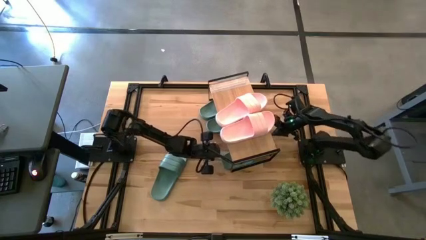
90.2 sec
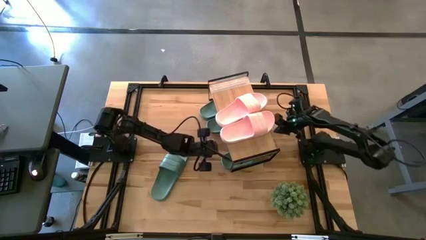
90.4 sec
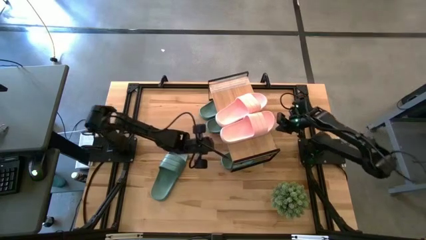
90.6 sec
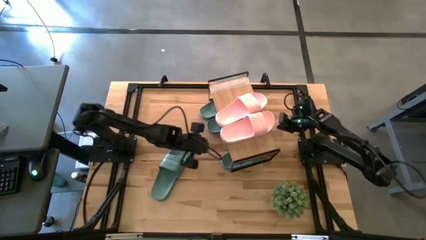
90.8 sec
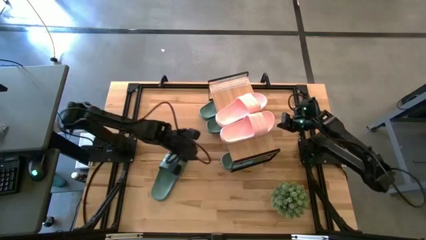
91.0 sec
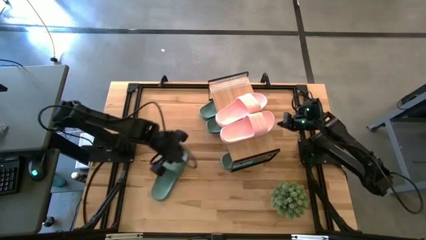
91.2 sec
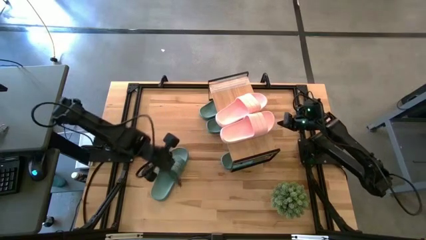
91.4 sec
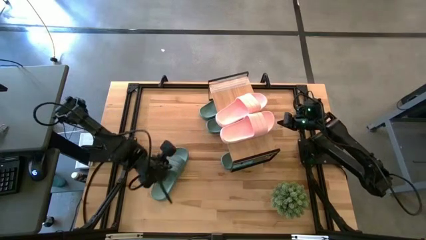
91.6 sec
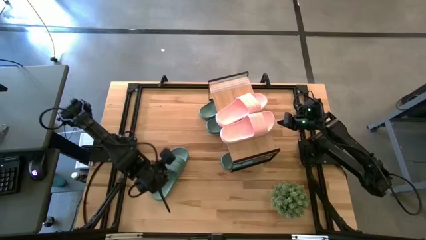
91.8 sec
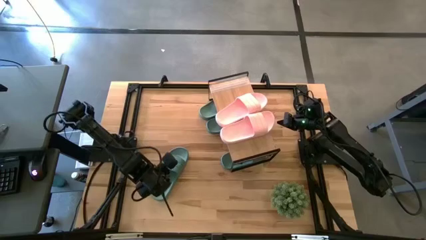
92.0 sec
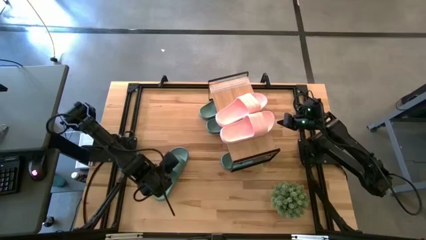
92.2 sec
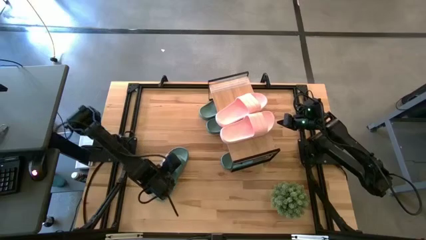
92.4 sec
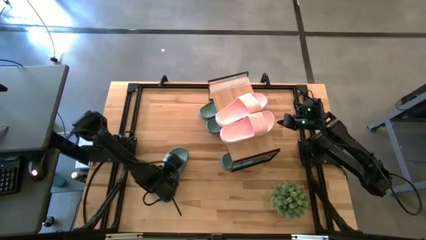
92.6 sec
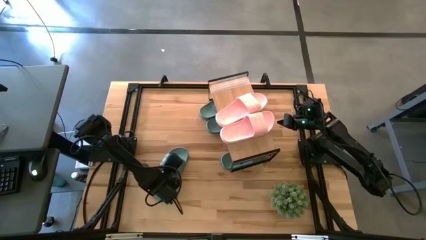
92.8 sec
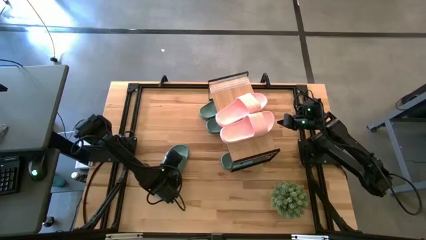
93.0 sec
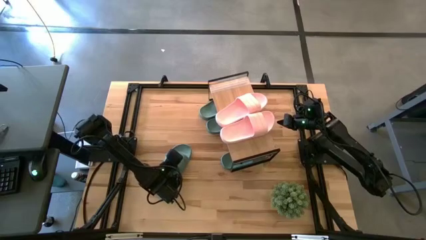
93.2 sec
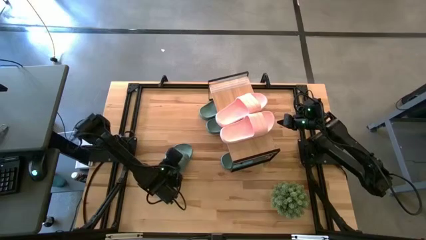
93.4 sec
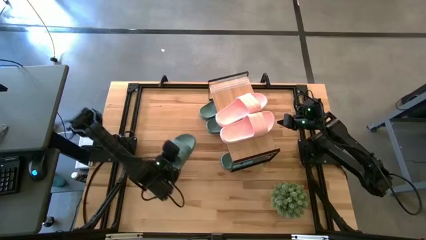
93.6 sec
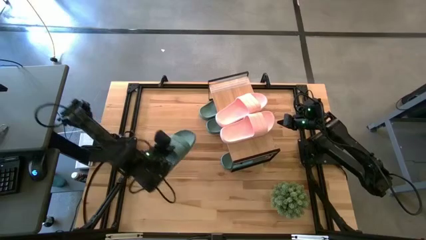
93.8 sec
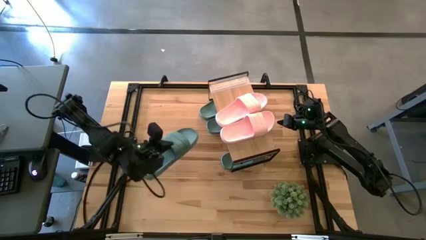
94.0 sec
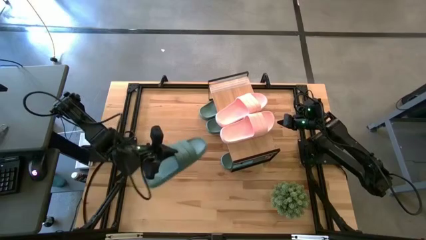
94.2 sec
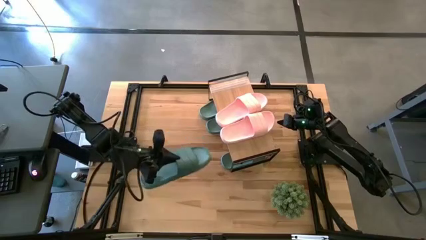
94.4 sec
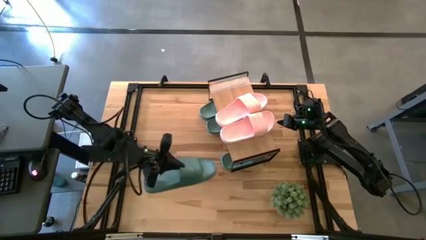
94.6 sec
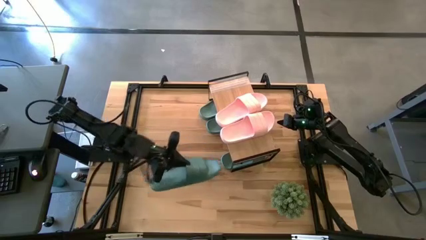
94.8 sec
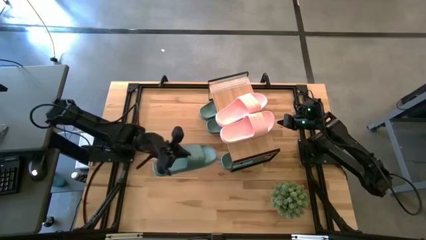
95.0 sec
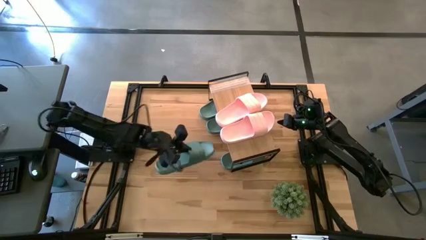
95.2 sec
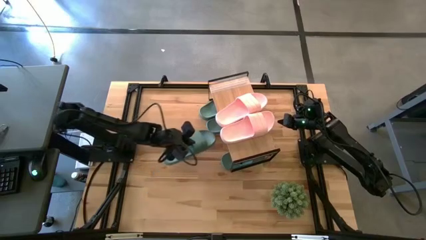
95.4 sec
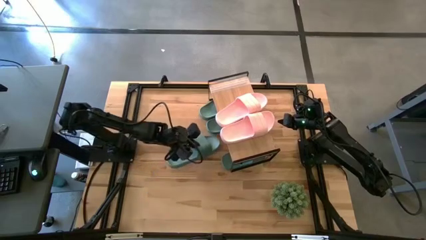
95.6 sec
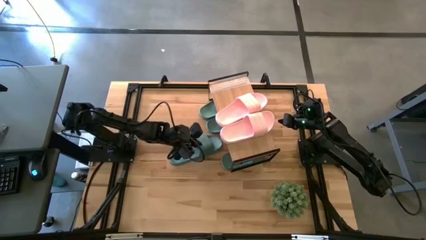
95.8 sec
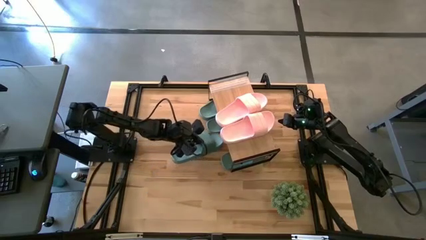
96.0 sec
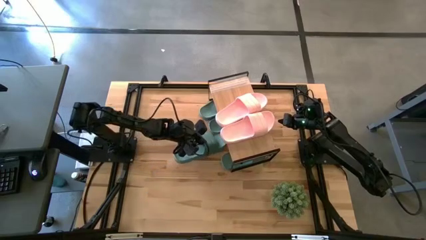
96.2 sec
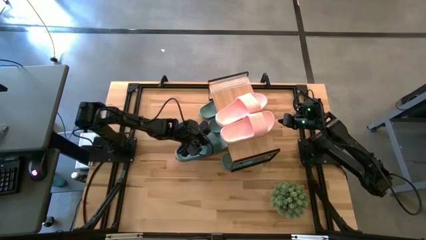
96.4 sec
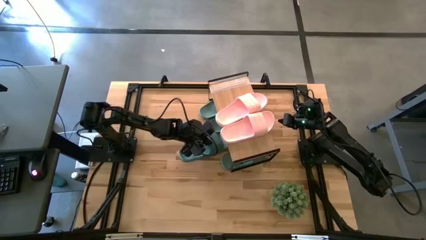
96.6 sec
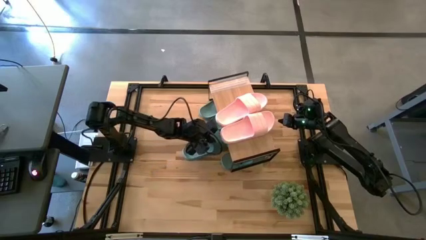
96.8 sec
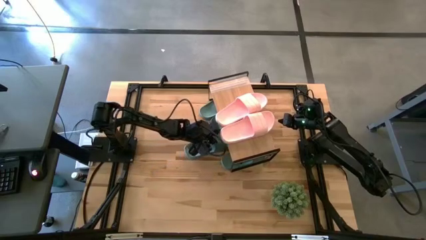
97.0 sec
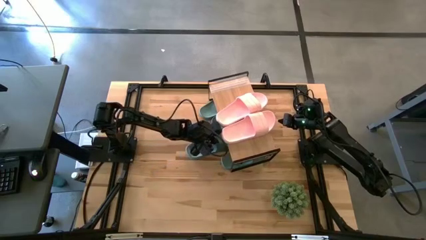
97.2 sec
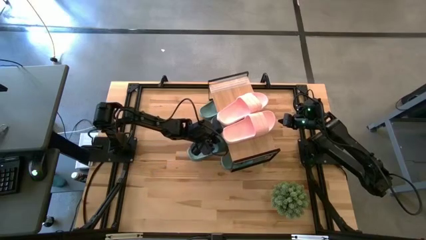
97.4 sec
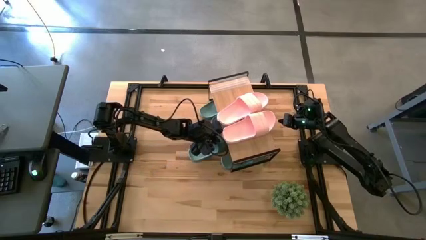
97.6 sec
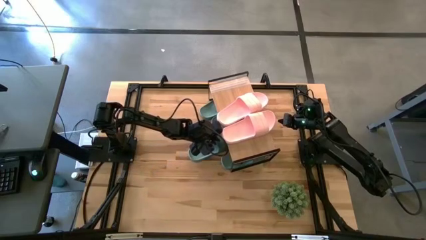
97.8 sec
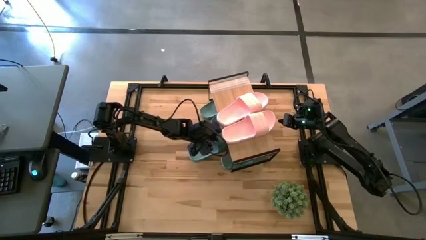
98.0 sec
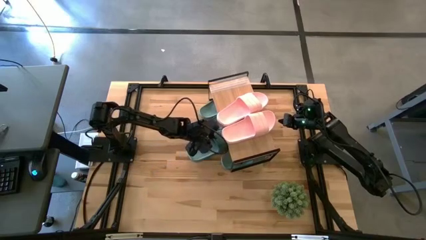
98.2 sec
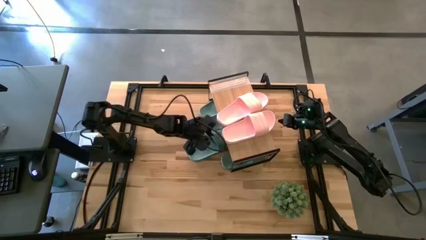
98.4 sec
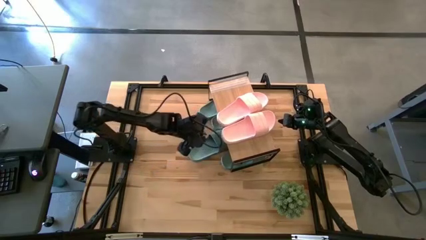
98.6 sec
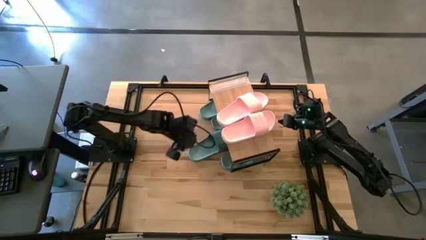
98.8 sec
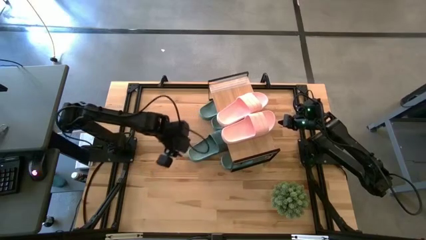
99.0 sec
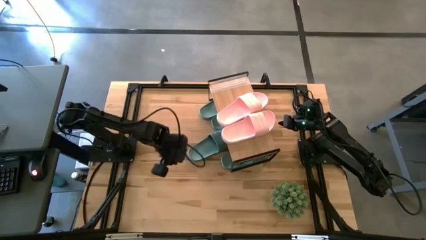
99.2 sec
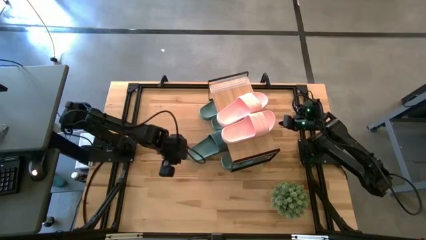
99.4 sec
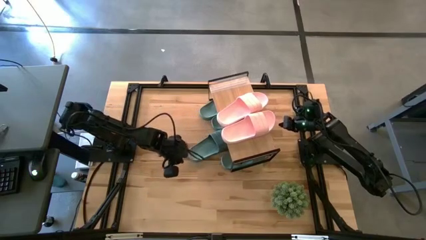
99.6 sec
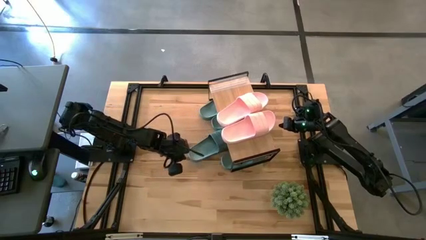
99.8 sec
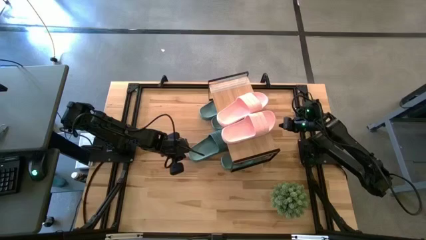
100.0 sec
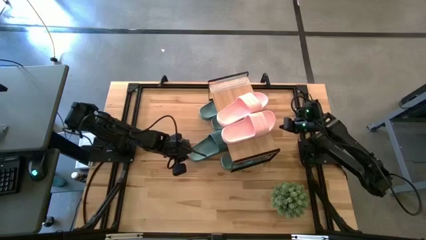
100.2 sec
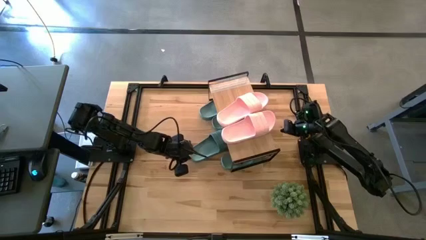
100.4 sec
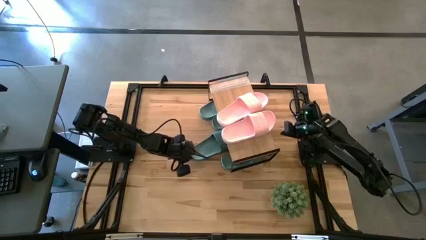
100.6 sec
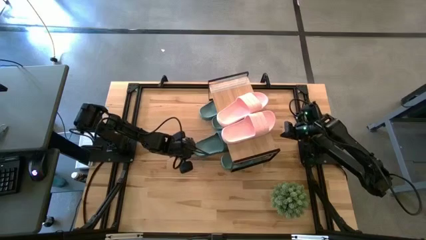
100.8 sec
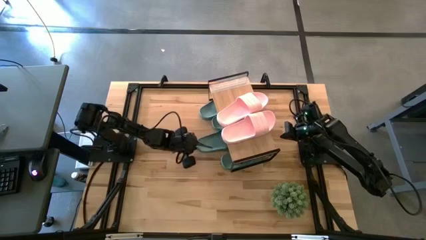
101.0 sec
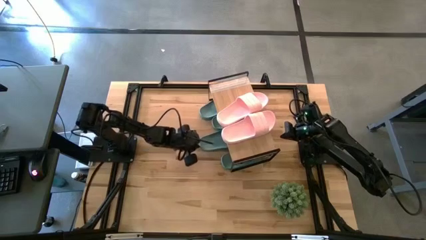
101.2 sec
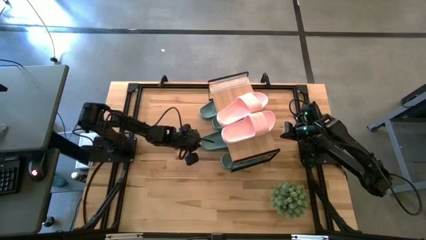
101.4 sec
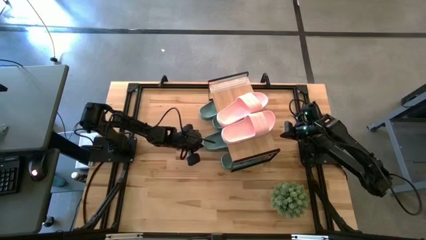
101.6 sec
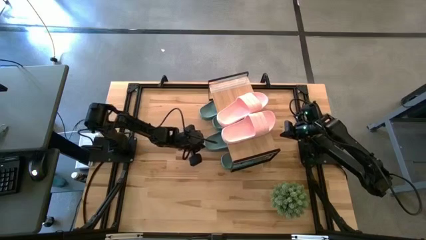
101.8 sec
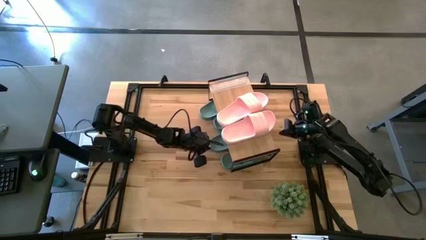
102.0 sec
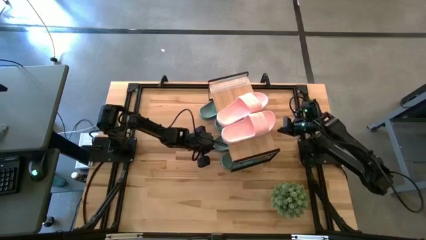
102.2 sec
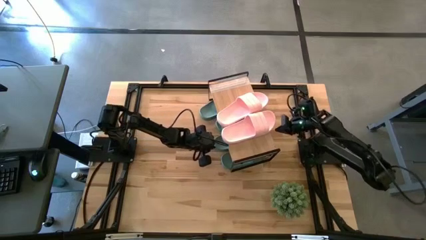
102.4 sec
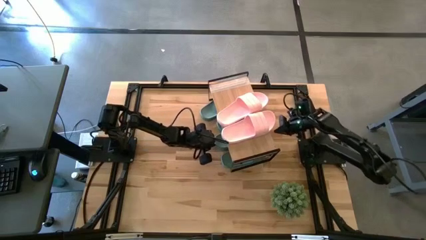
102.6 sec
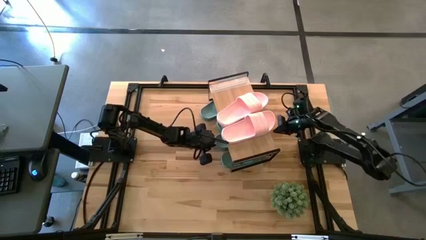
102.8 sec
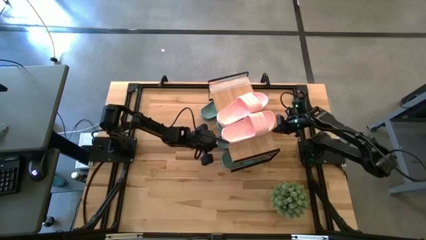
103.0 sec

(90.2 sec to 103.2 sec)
Task: Pick and place slides into the shelf
Put the green slide under the shelf

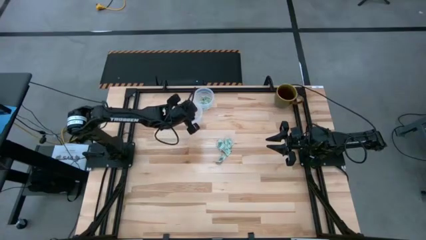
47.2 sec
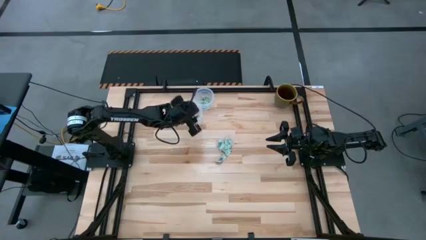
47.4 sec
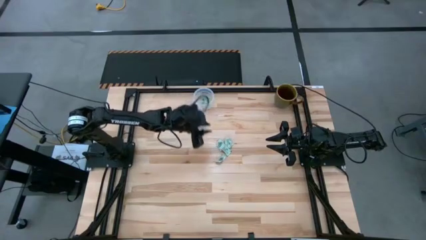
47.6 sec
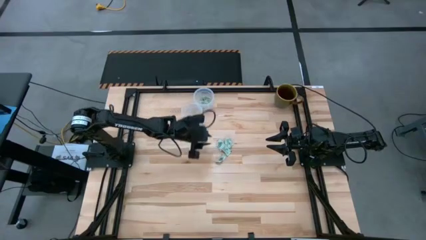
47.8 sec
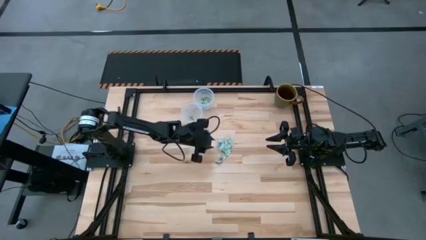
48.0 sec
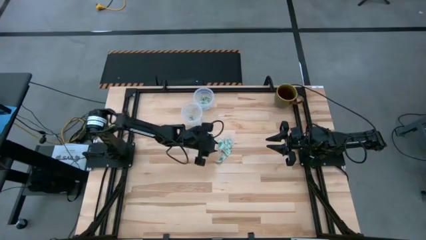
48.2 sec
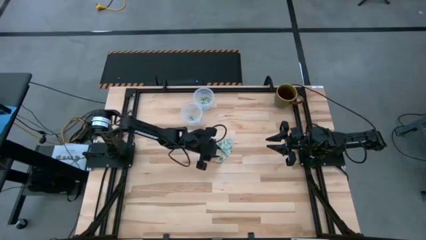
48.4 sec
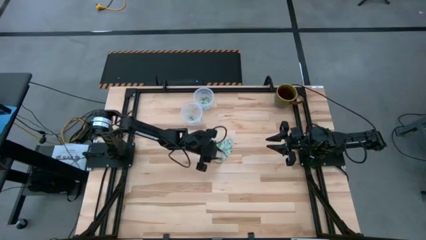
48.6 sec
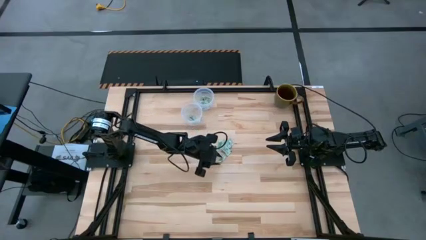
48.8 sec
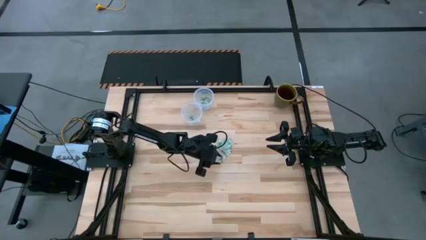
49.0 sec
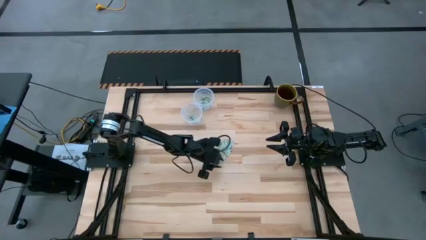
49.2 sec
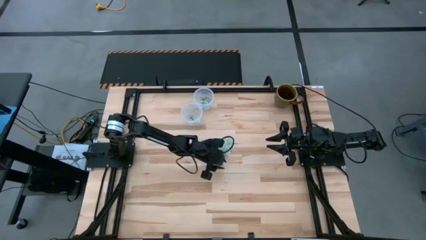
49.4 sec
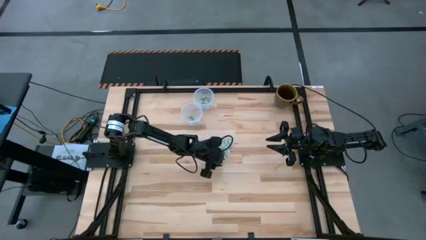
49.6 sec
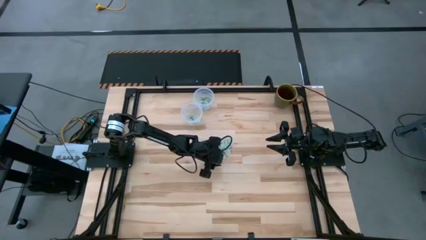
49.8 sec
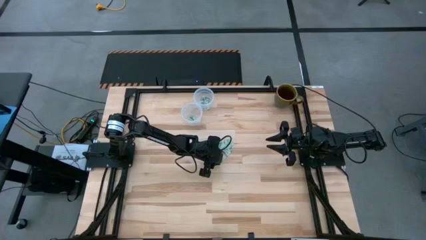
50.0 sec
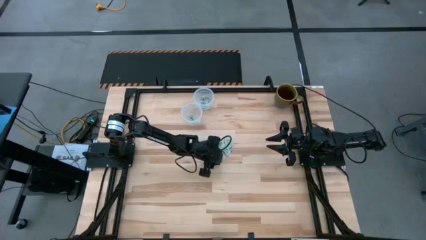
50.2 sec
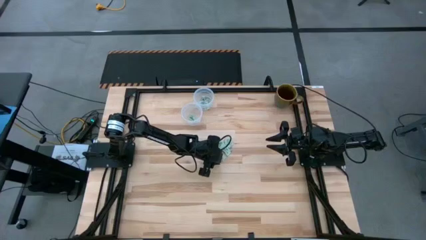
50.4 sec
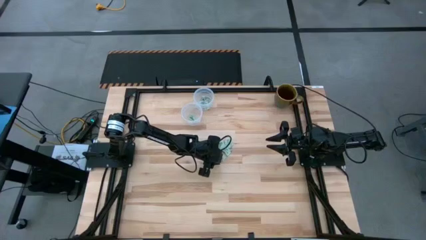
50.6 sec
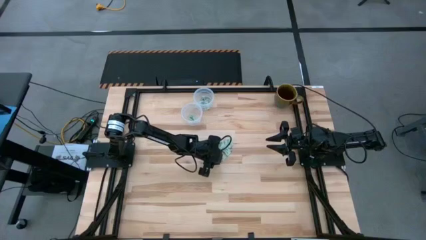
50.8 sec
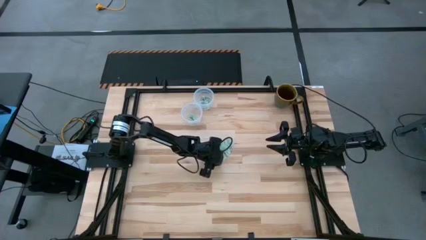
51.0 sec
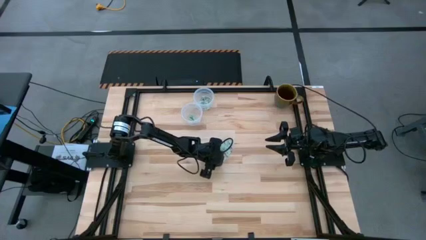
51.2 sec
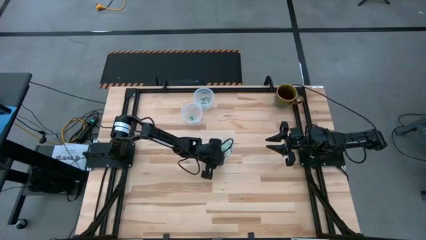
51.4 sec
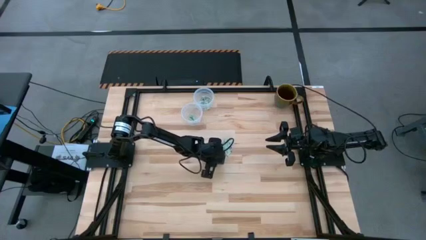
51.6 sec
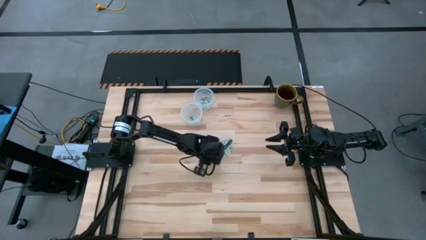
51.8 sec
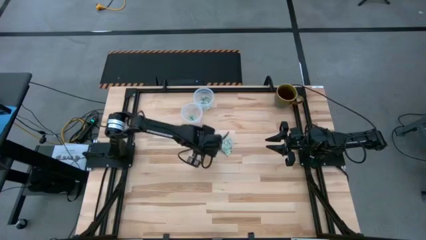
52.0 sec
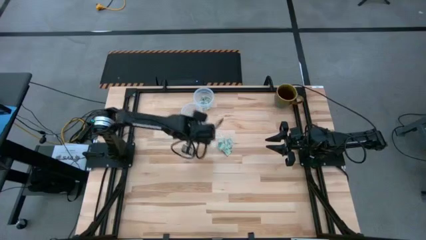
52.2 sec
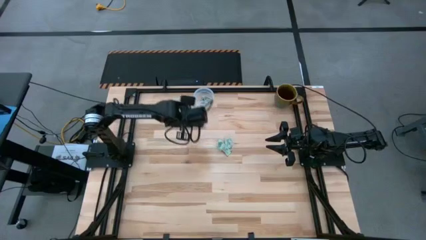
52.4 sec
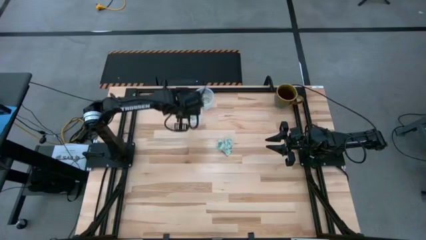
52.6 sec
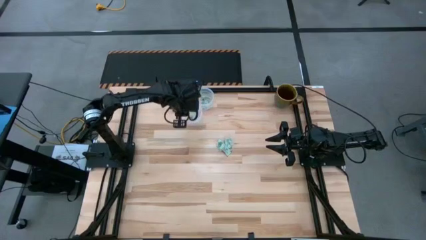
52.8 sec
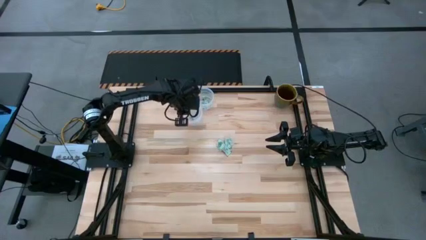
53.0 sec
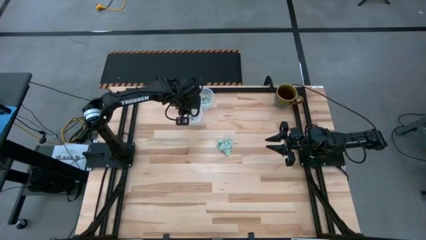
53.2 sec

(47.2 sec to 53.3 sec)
Task: Pick and place items into bin
Put the stevia packet into the bottom bin
